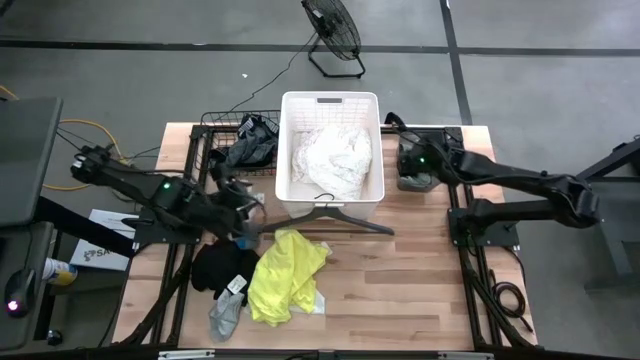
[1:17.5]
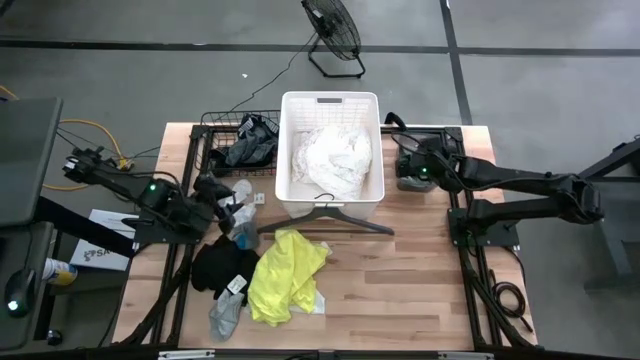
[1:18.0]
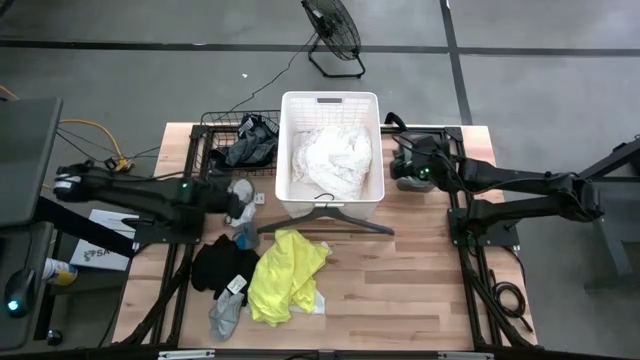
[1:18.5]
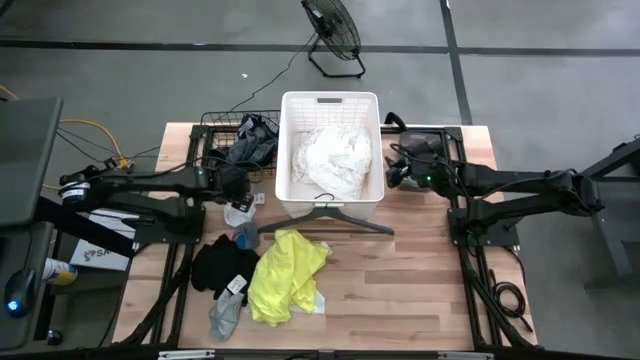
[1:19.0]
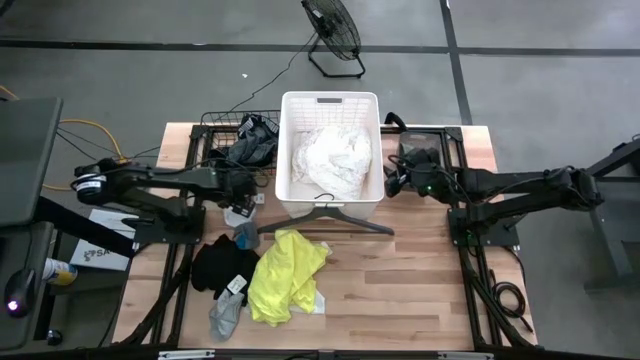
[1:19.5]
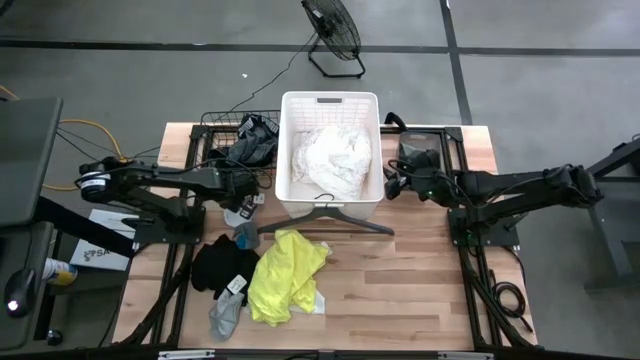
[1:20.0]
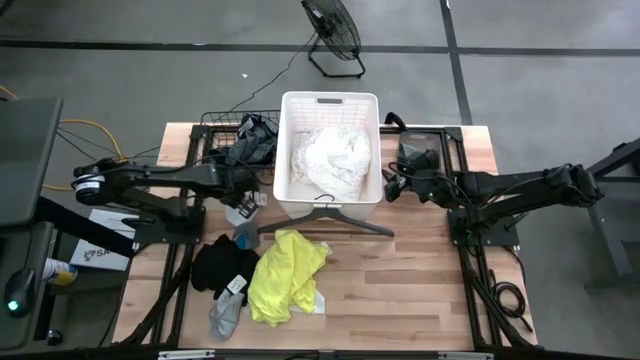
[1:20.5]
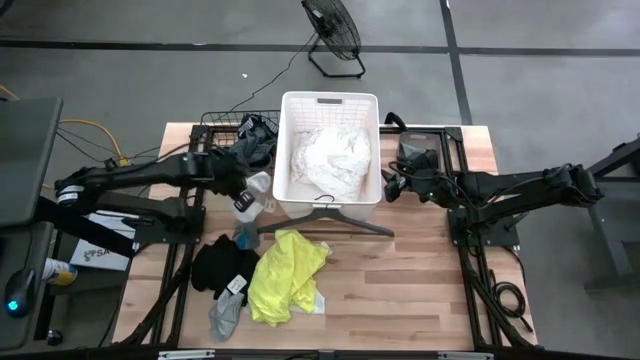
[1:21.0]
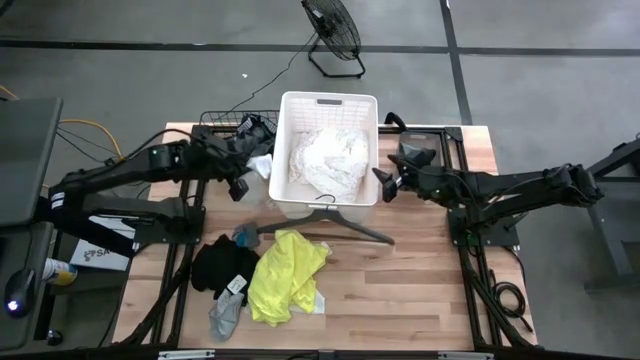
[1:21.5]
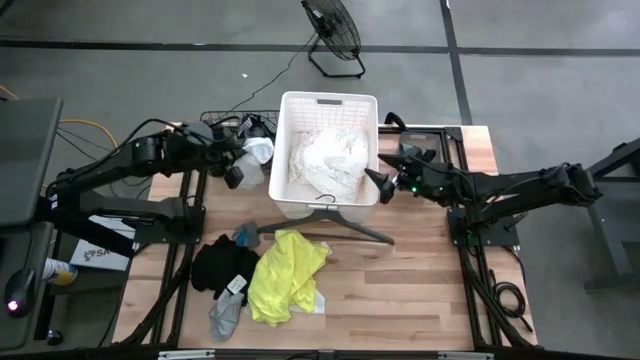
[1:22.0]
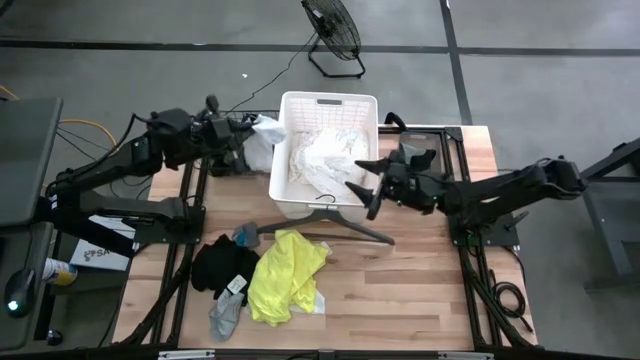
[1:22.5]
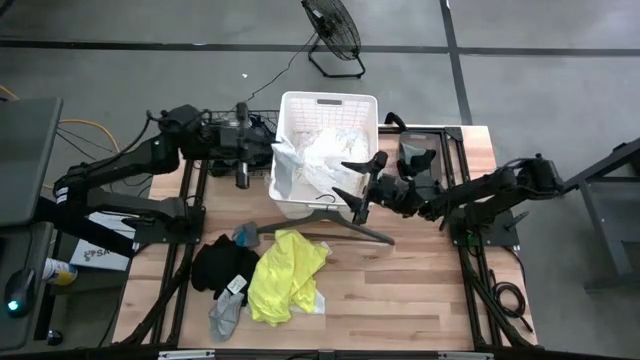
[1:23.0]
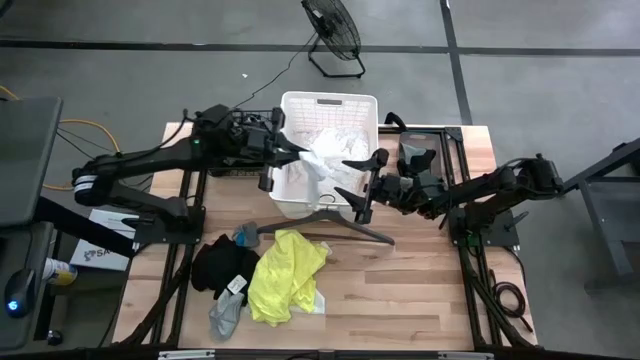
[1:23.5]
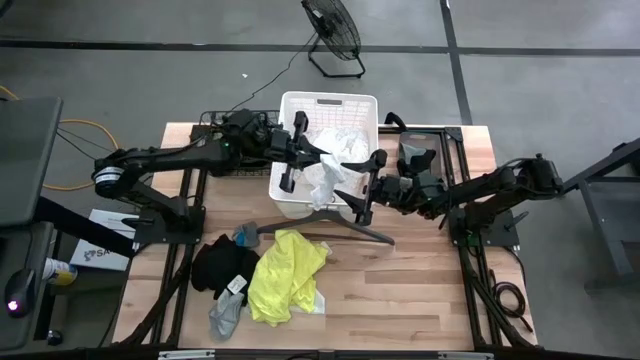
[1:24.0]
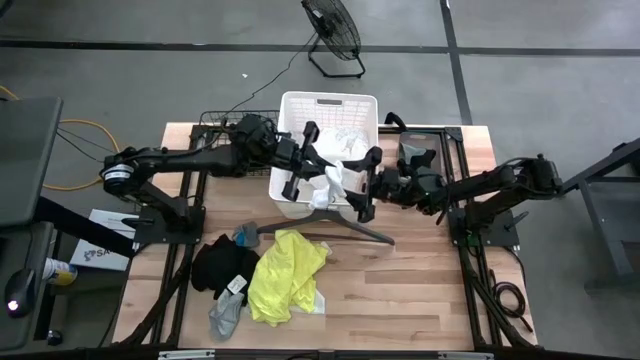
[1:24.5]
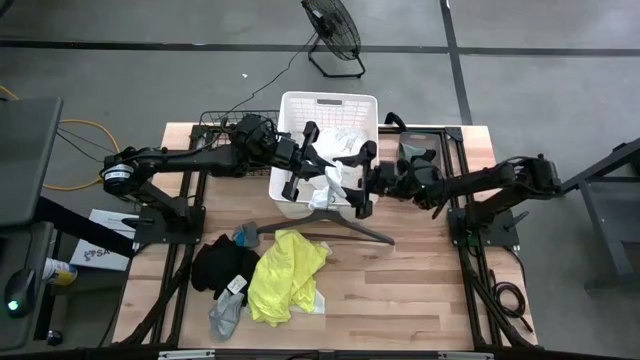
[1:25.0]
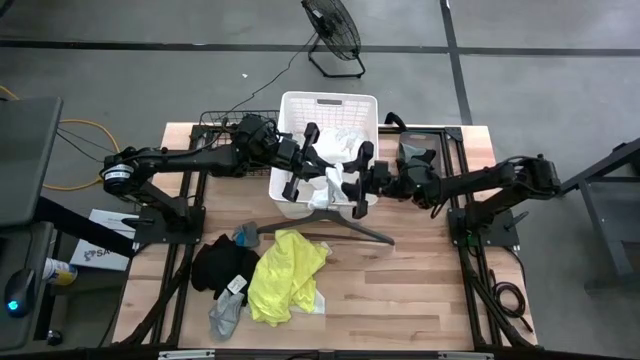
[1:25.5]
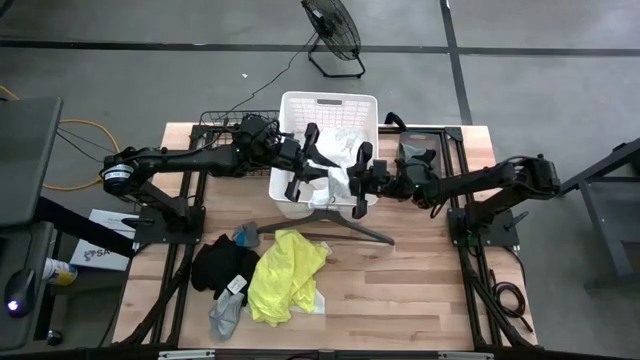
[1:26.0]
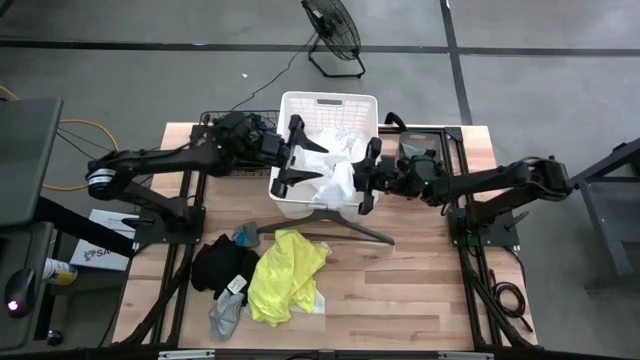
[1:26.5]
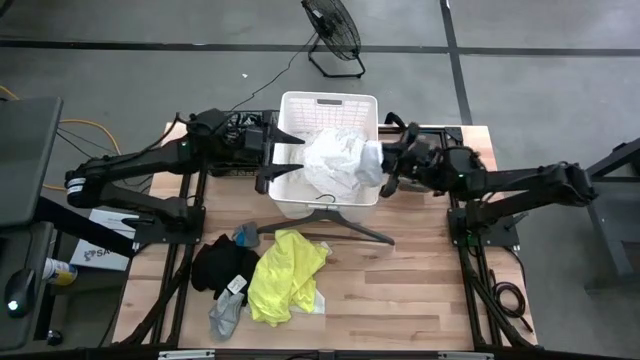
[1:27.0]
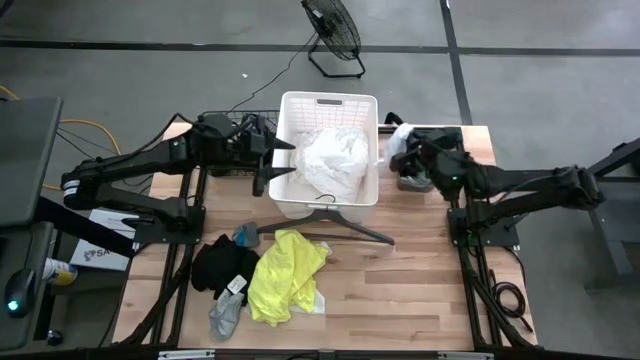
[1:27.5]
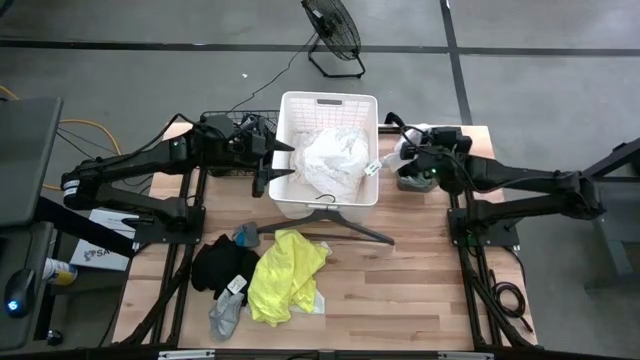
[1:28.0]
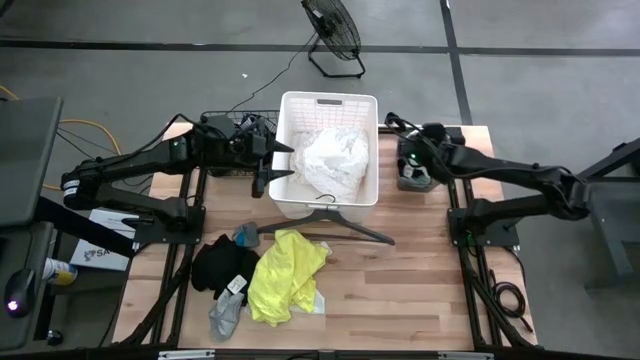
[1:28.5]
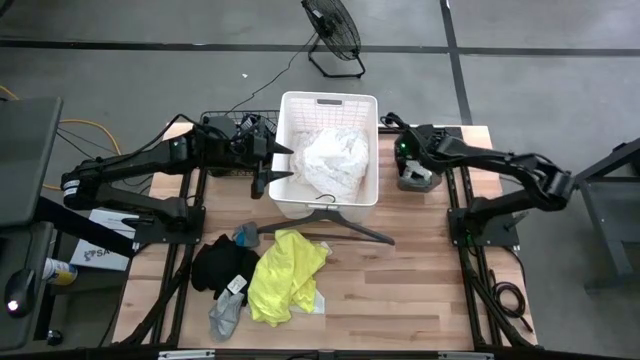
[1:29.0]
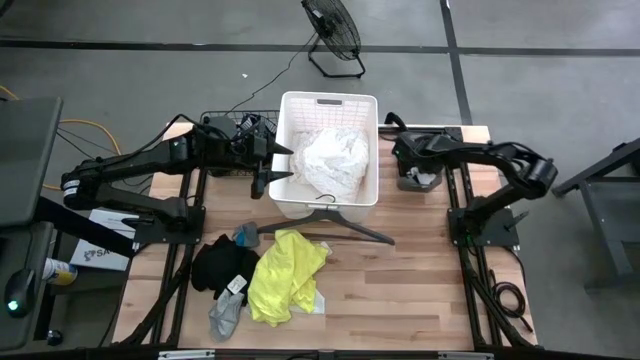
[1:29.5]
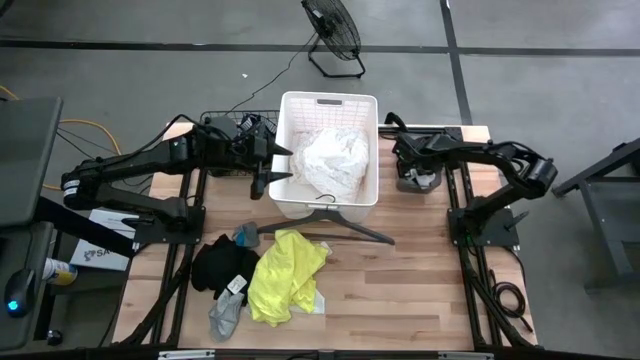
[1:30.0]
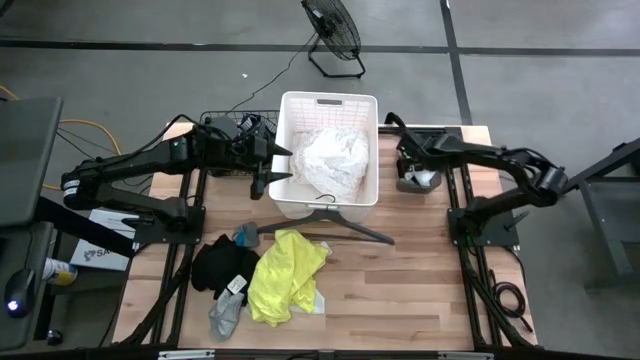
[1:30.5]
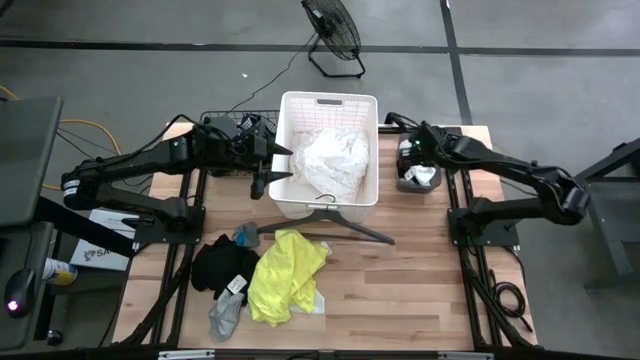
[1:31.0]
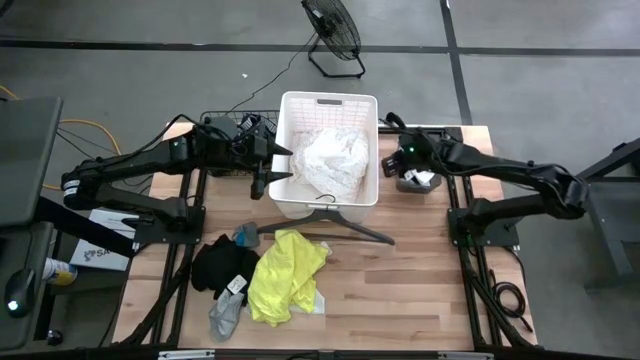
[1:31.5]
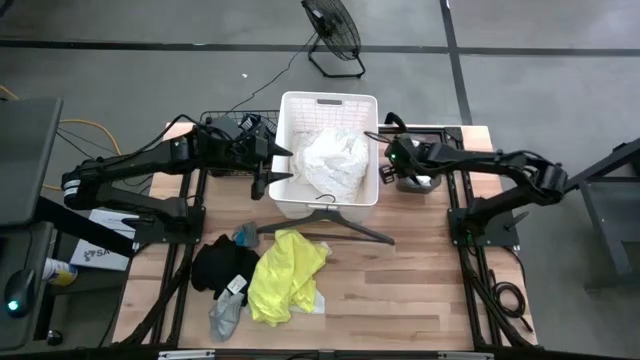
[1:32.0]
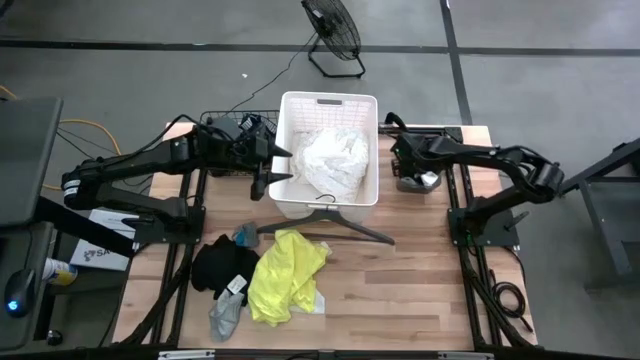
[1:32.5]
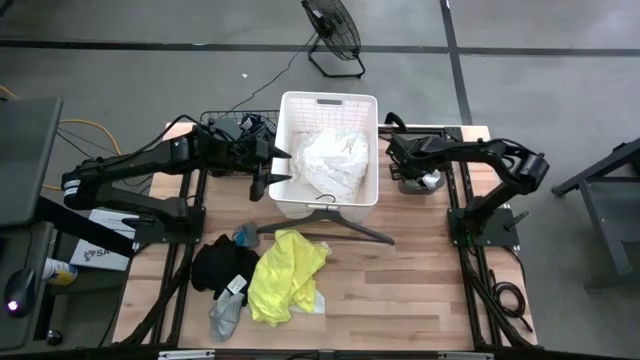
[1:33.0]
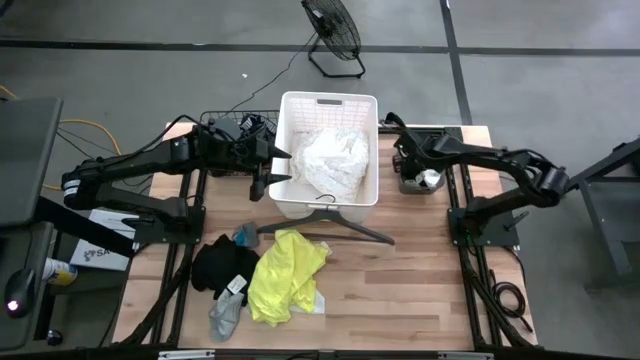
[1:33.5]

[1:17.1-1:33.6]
Task: Pick & Place Cloths
Put the white sock into the black bin

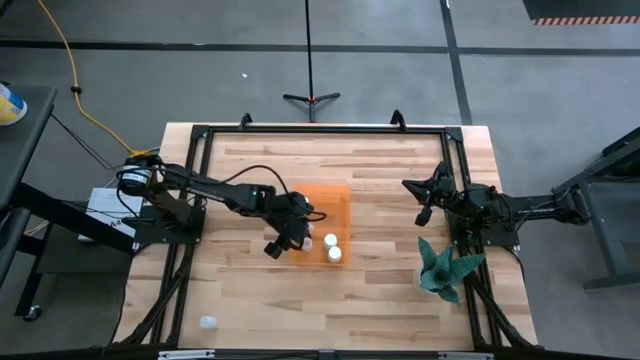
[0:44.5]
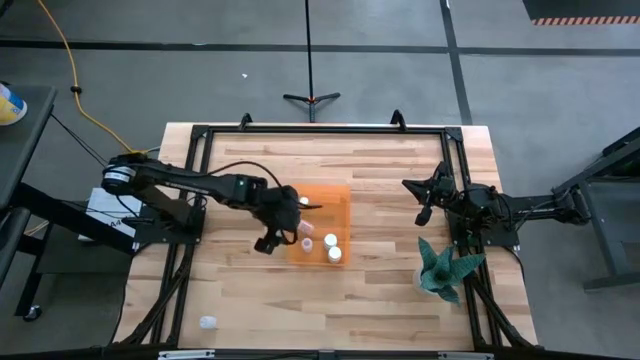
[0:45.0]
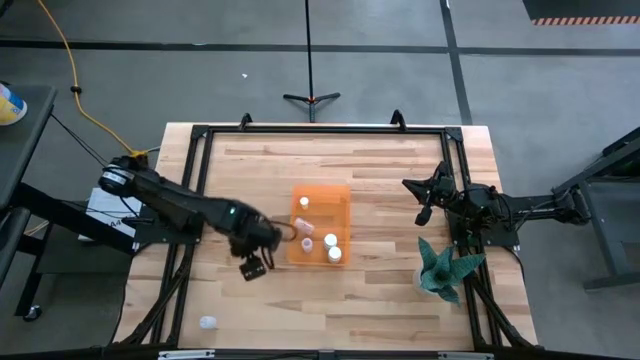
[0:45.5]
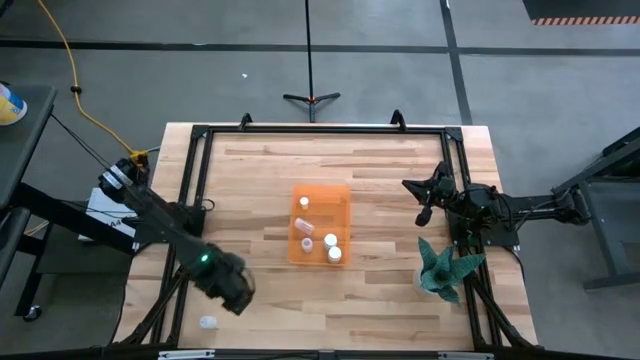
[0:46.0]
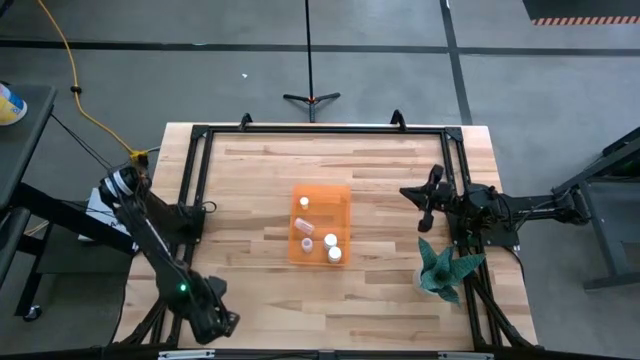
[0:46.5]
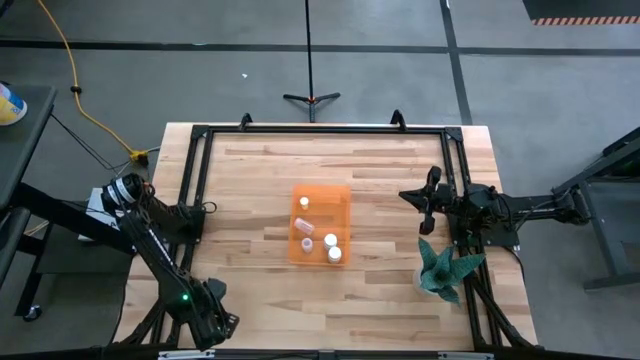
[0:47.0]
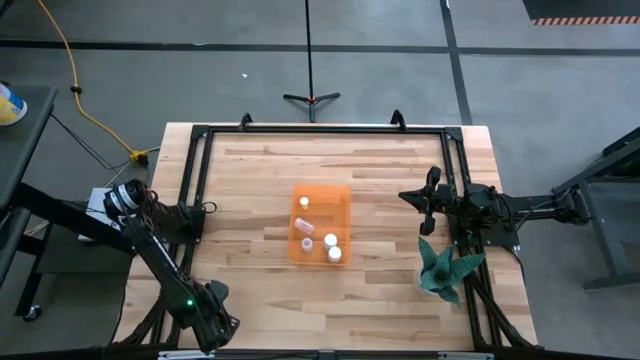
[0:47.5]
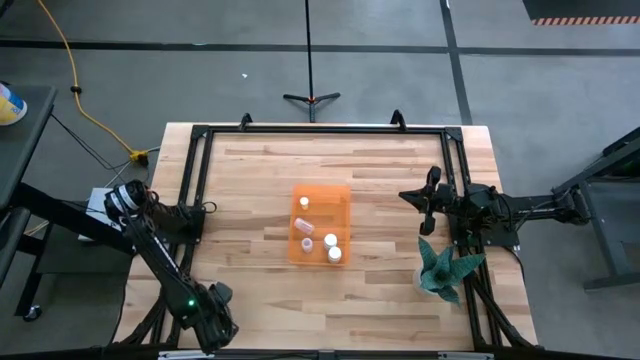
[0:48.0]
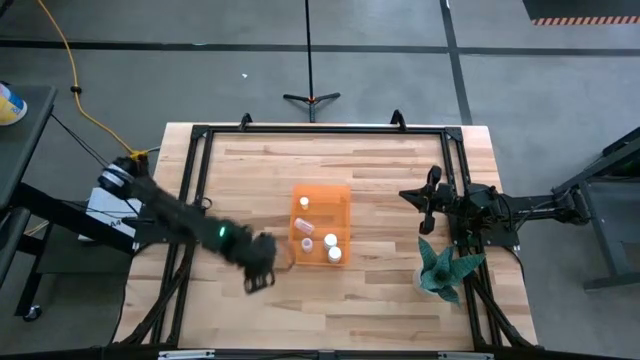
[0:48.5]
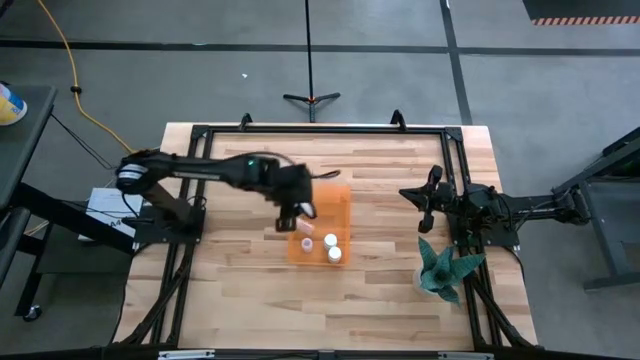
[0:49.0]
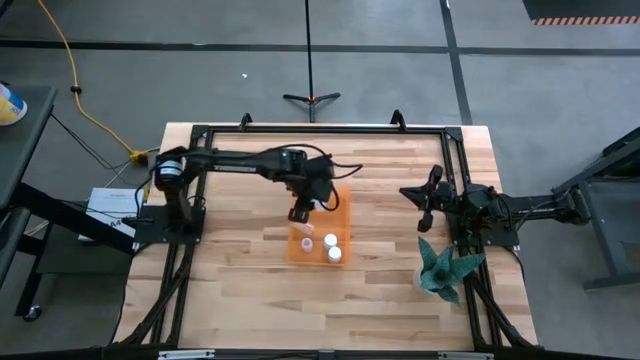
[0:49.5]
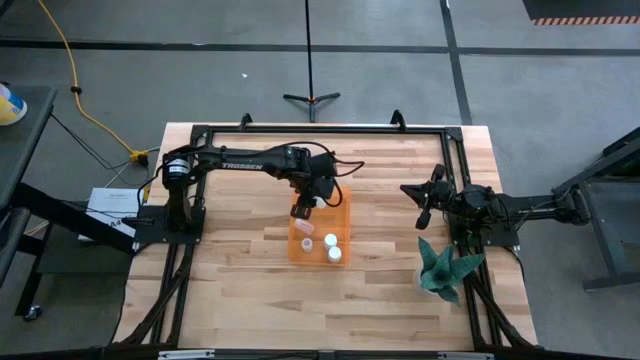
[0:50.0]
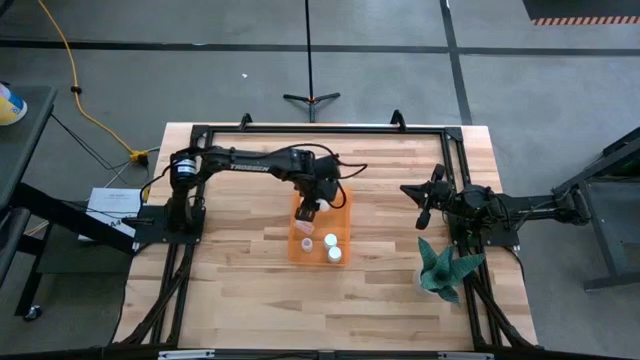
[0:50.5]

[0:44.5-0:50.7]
Task: Pick and place pill bottles into a basket
Put the transparent pill bottle into the orange bin
